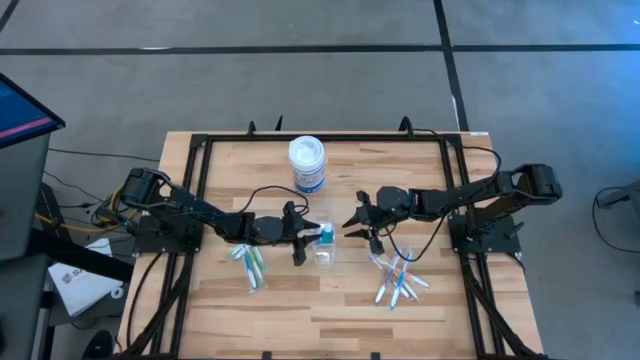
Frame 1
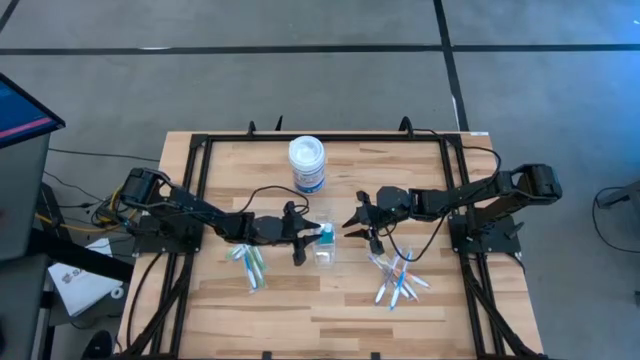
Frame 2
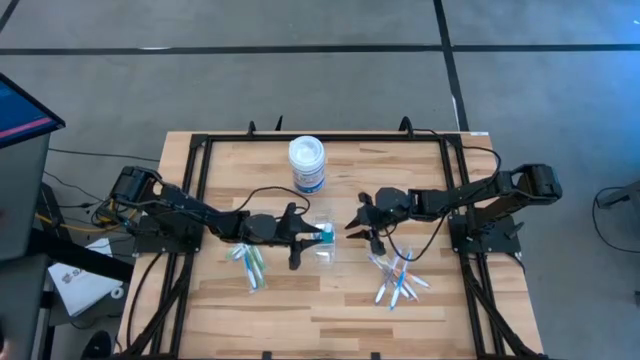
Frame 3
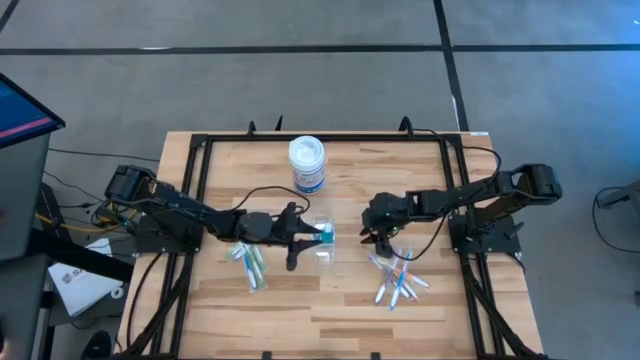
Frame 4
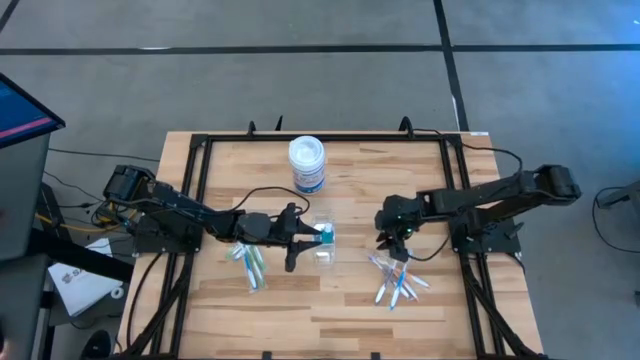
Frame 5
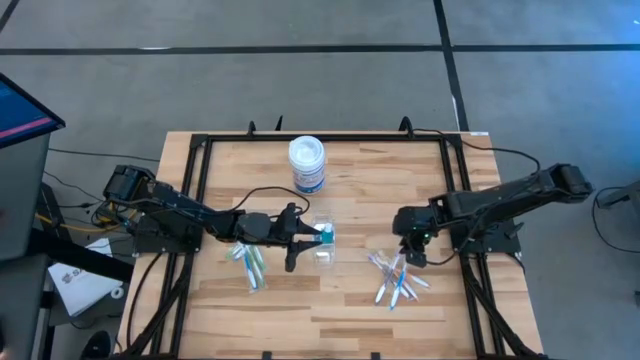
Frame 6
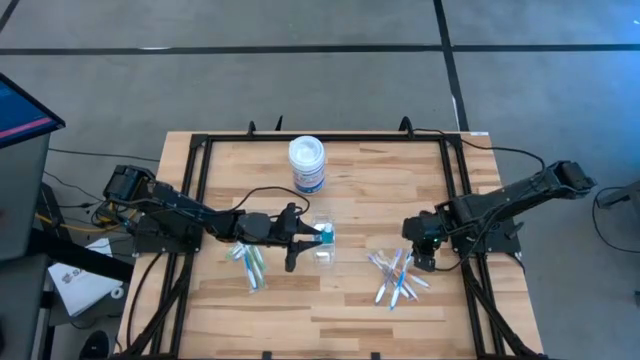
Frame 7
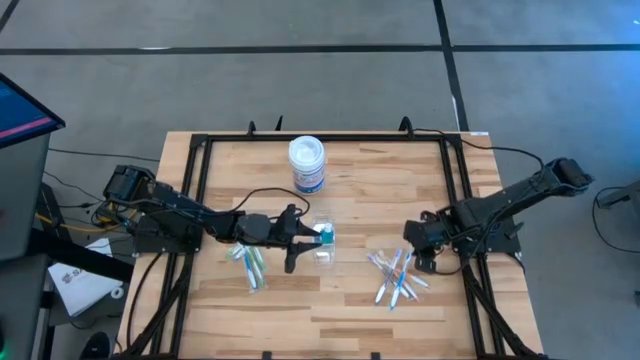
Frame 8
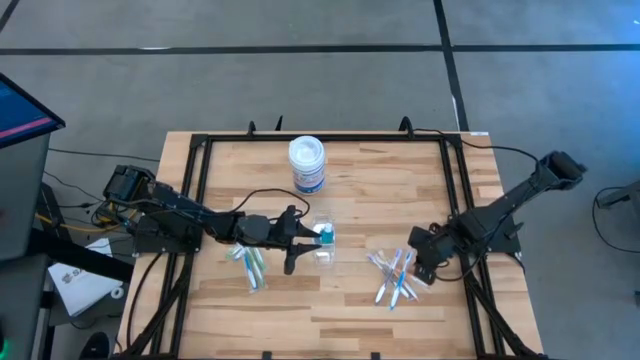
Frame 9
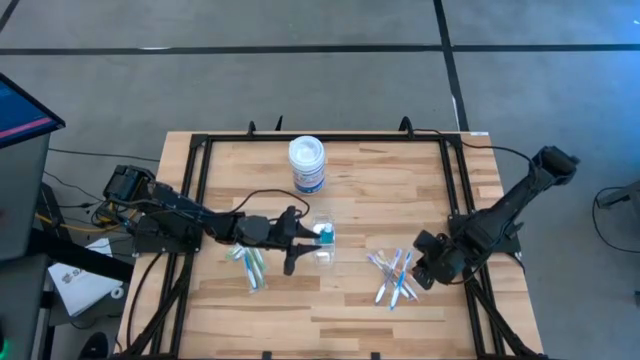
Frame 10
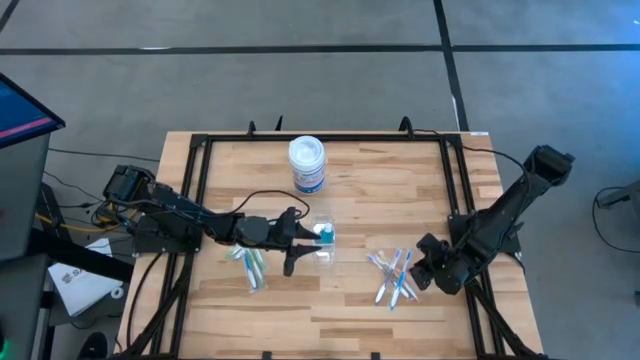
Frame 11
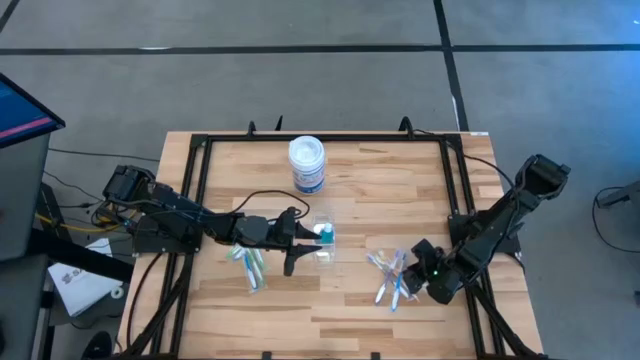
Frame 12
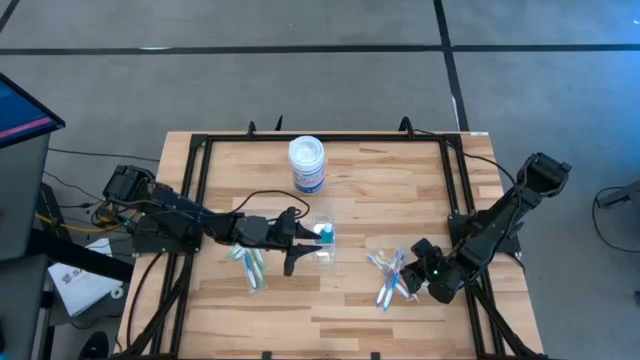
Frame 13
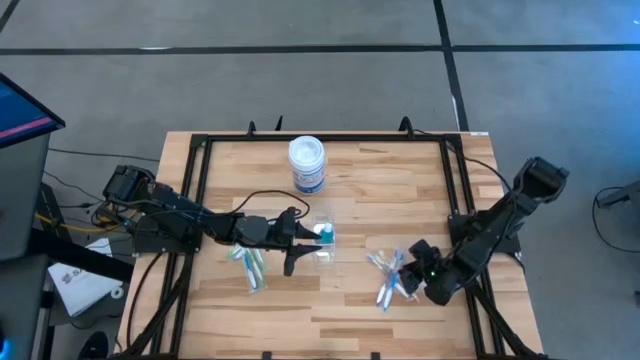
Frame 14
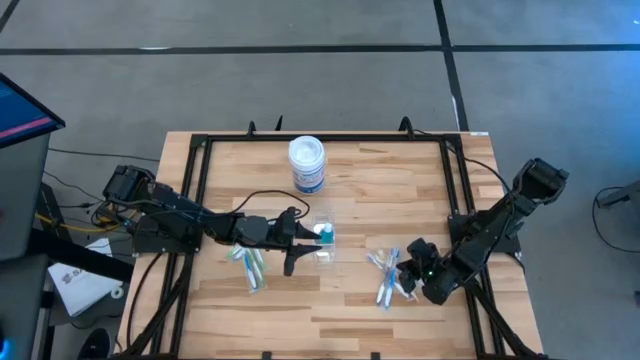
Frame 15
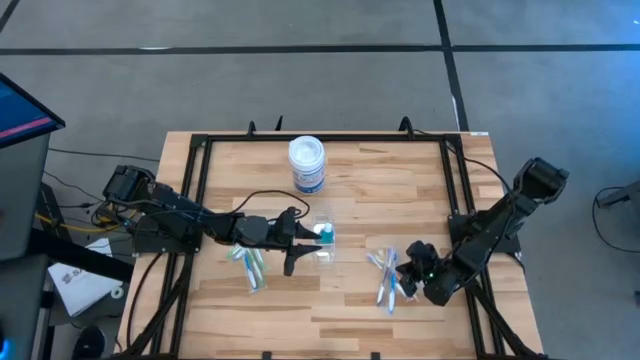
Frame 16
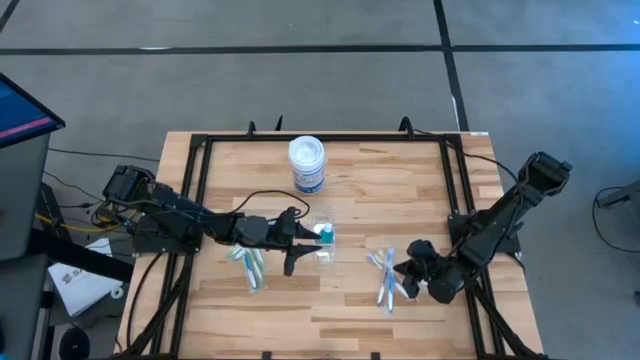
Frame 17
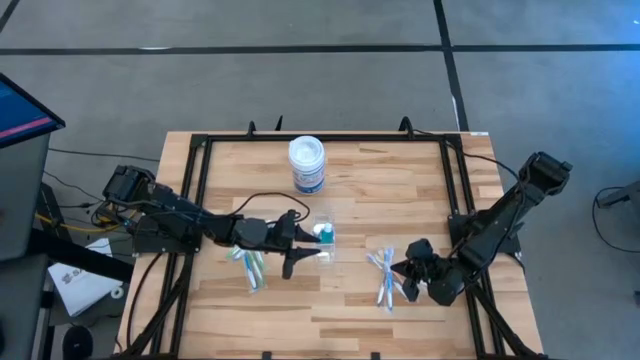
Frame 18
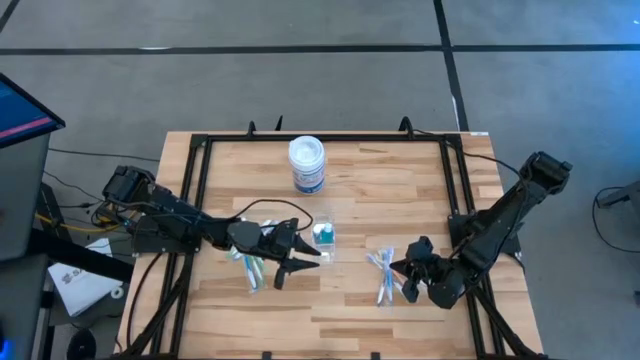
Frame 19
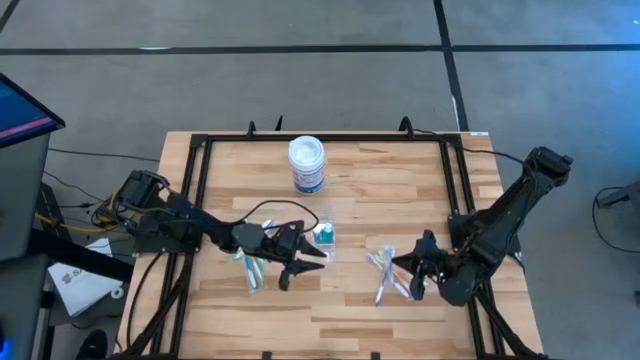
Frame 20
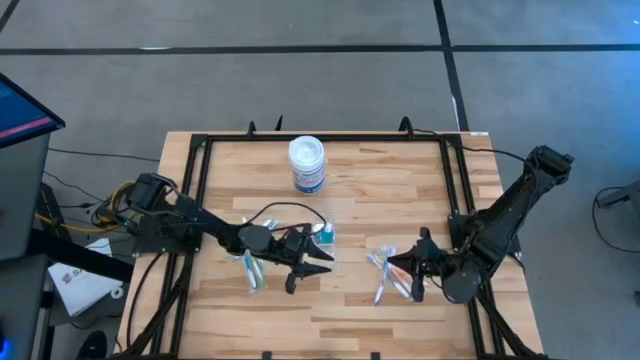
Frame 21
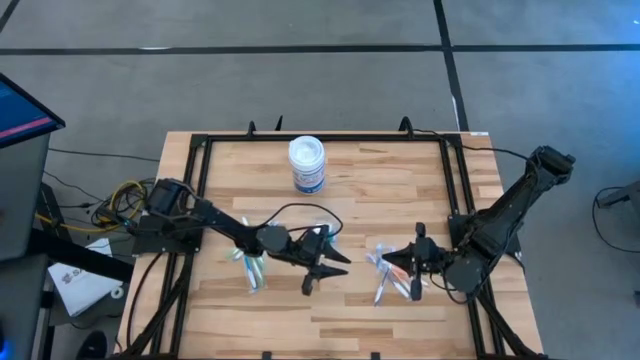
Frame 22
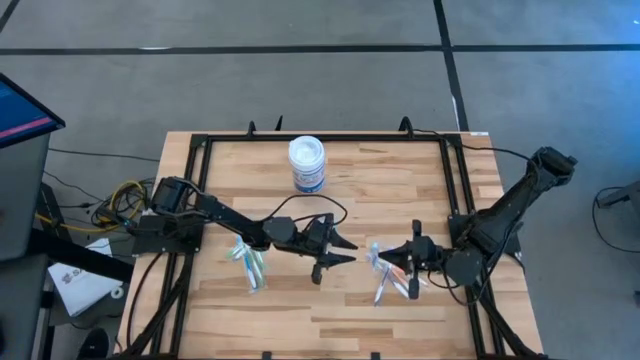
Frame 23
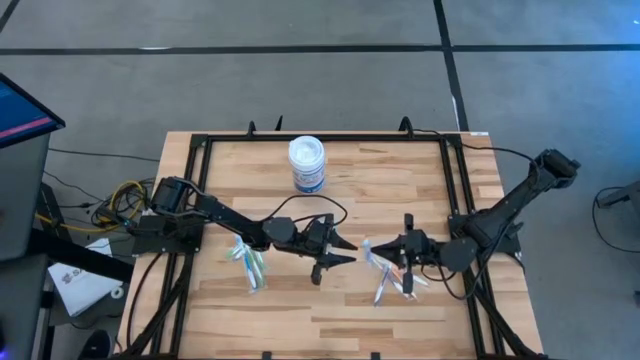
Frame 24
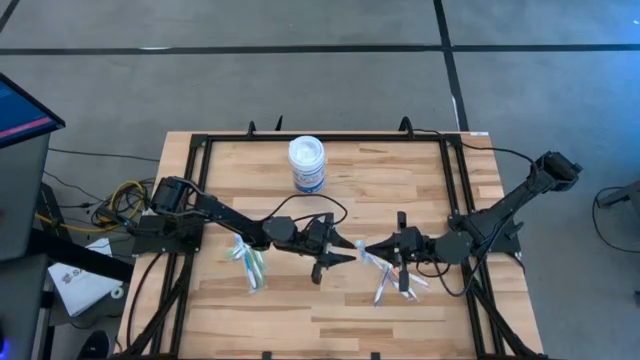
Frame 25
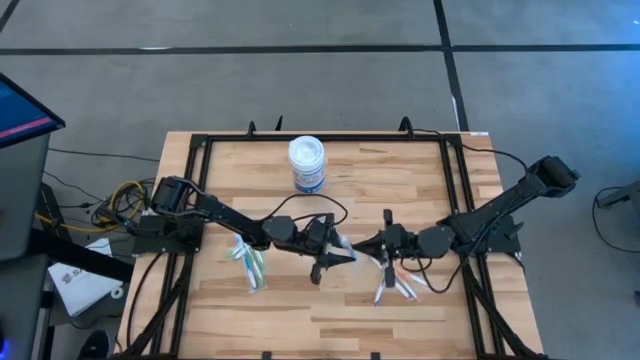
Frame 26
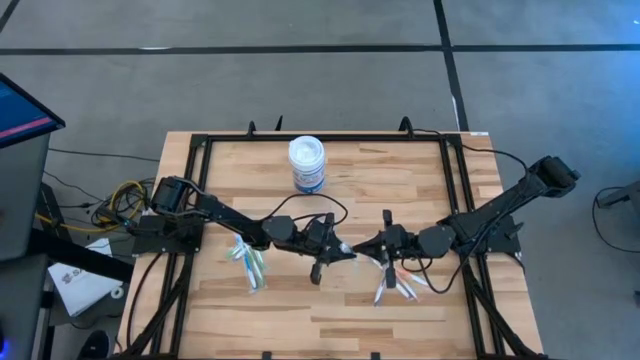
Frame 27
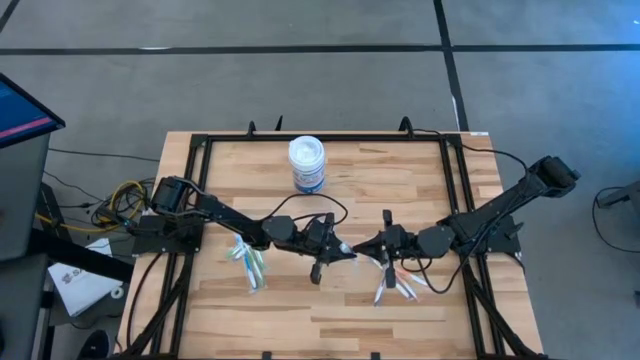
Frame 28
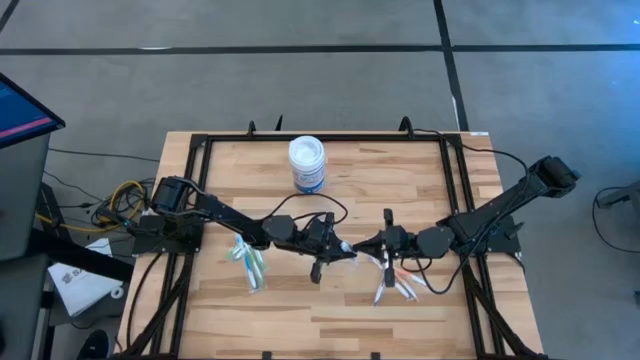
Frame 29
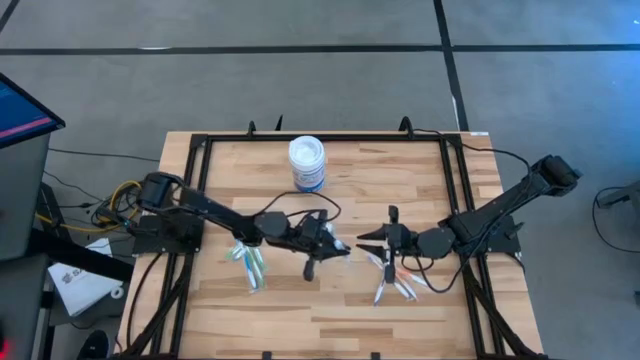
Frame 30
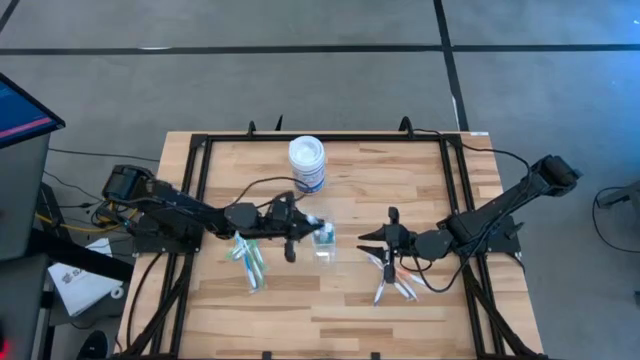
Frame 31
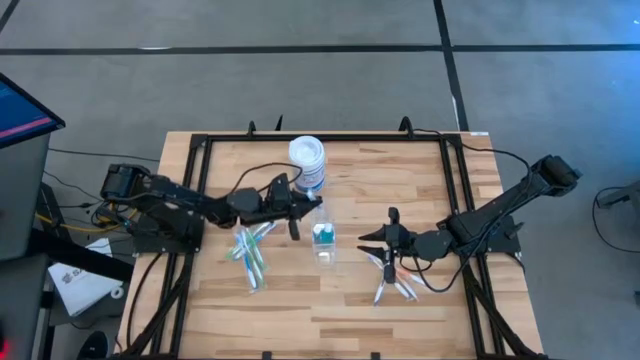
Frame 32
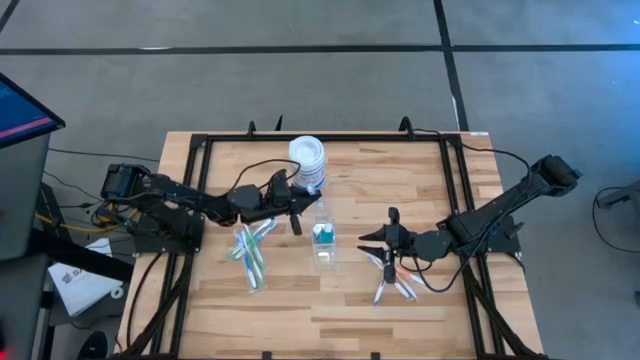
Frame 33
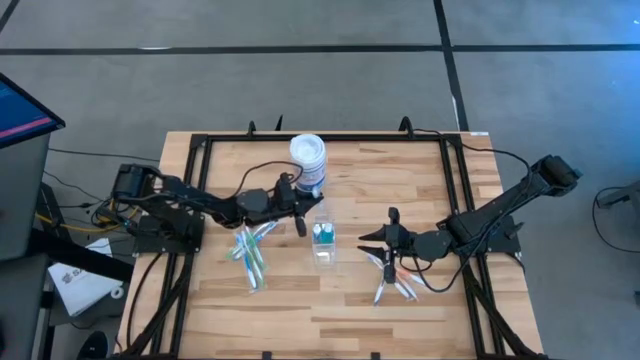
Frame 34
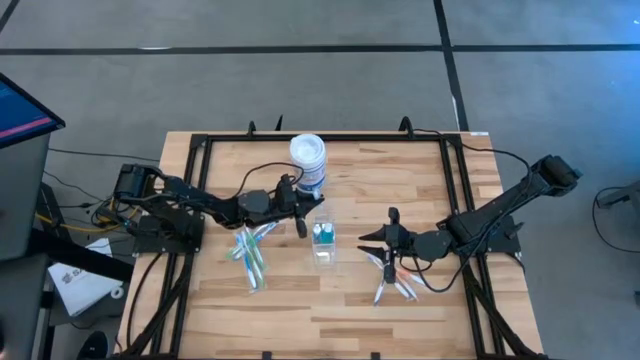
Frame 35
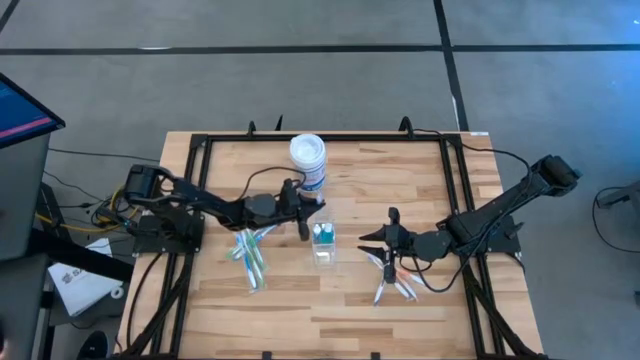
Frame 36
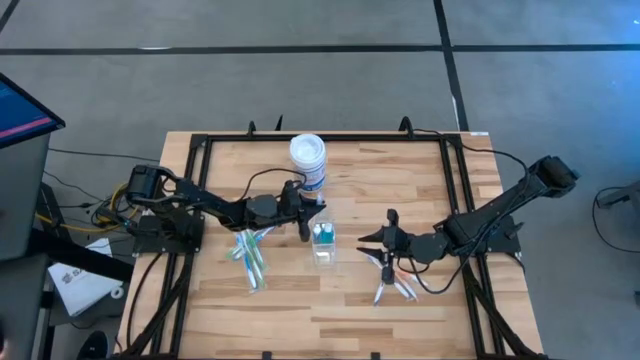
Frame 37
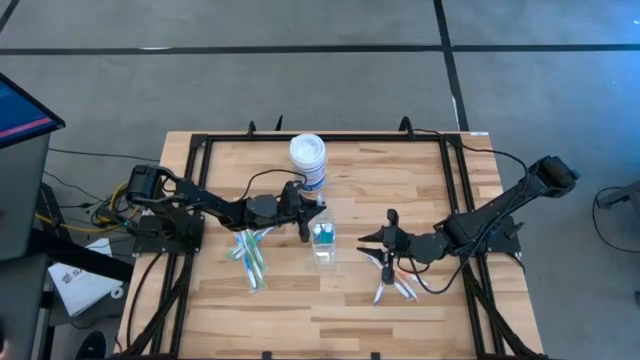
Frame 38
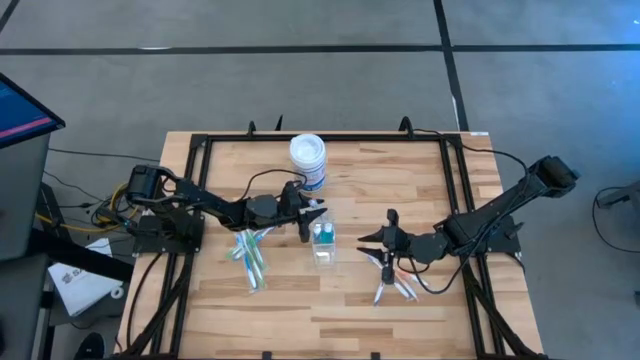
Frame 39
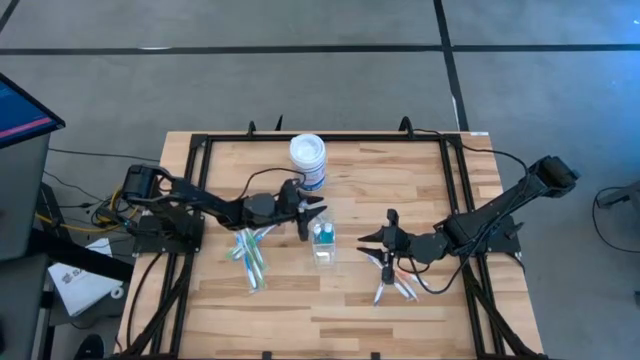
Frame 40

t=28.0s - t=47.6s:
Task: Pick & Place toothbrushing station
Put the right blue mouthwash into the Transparent organizer
